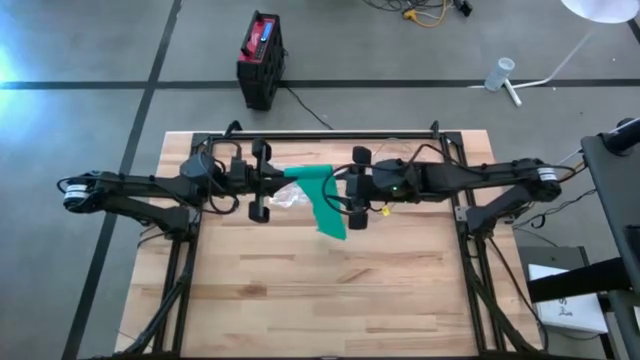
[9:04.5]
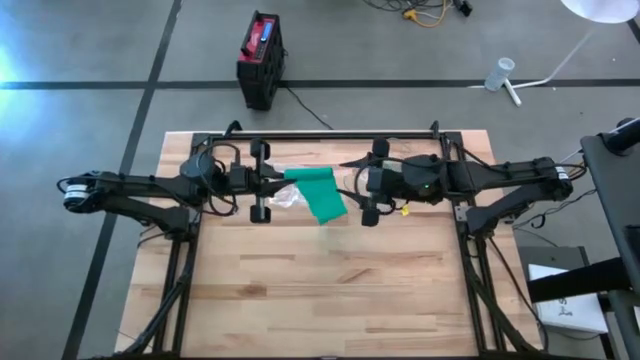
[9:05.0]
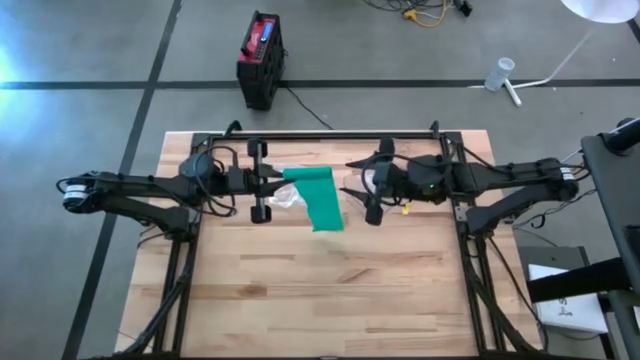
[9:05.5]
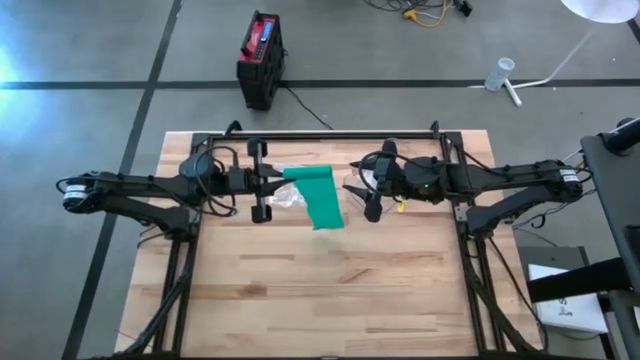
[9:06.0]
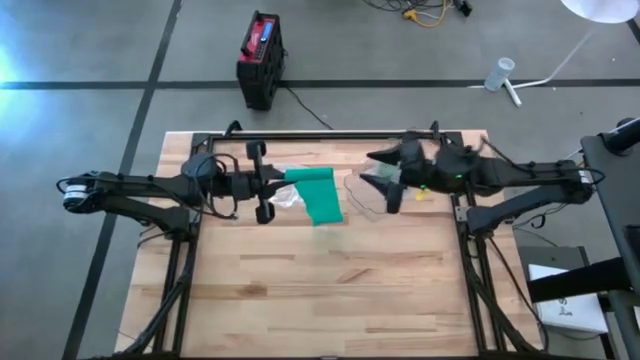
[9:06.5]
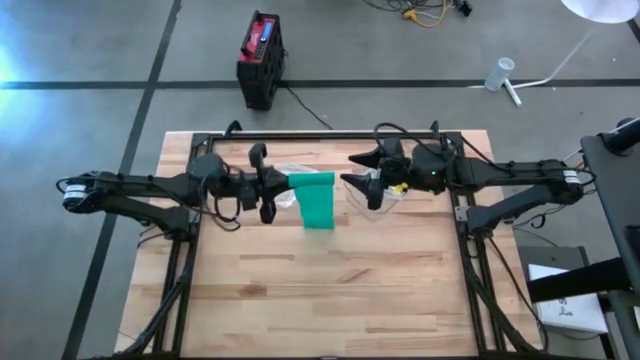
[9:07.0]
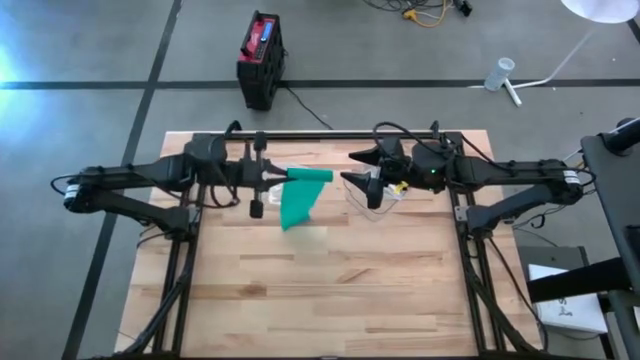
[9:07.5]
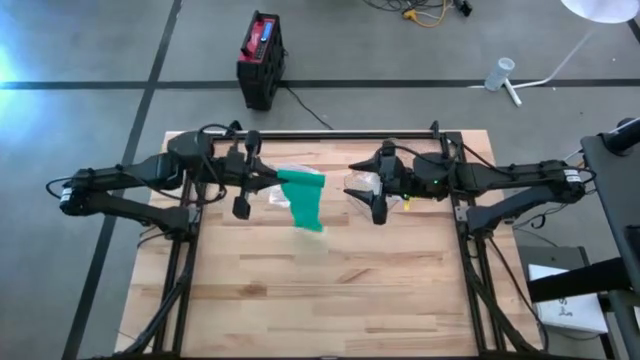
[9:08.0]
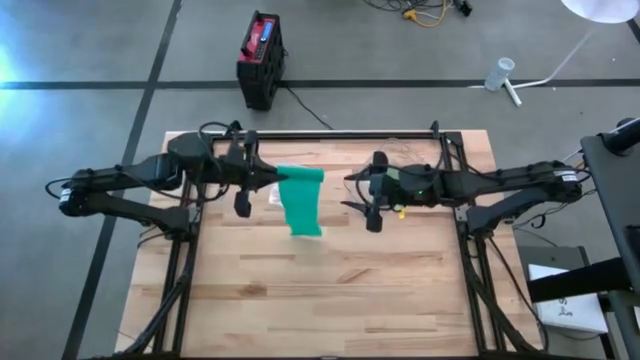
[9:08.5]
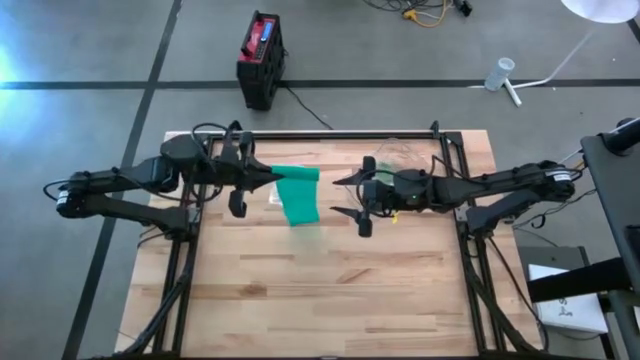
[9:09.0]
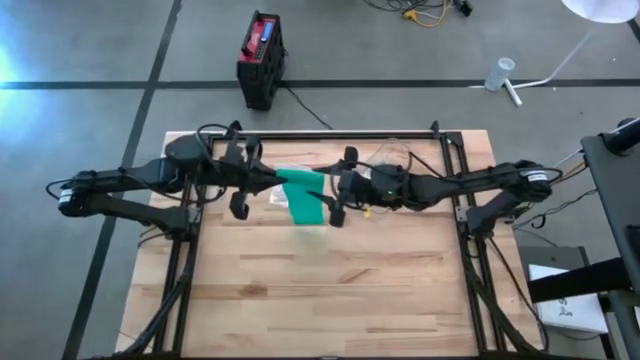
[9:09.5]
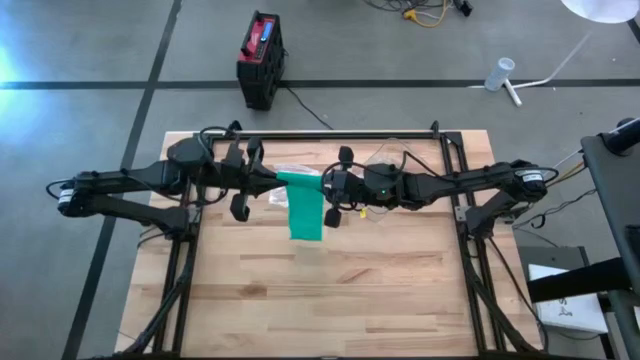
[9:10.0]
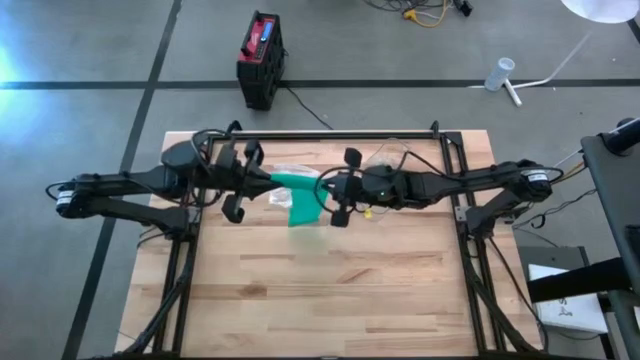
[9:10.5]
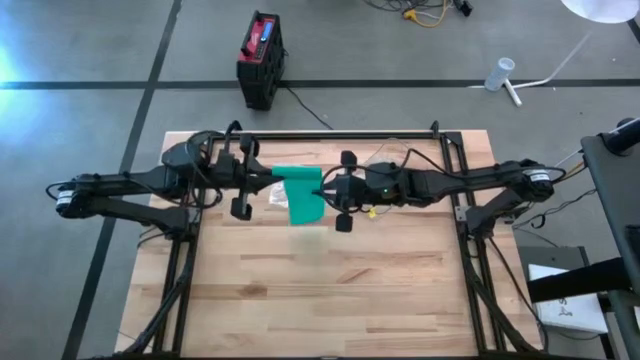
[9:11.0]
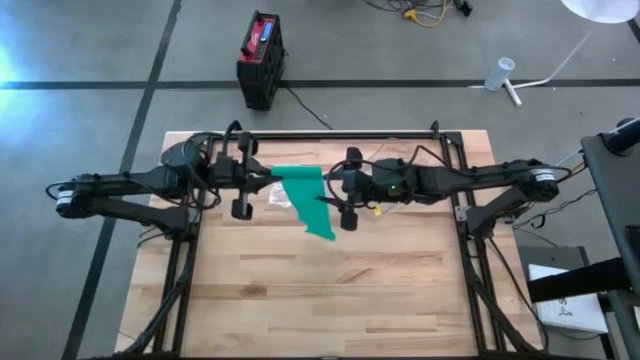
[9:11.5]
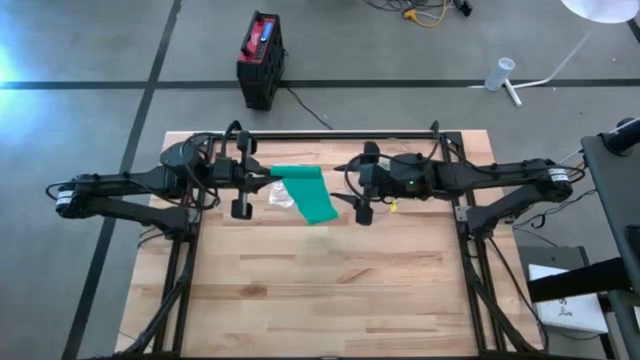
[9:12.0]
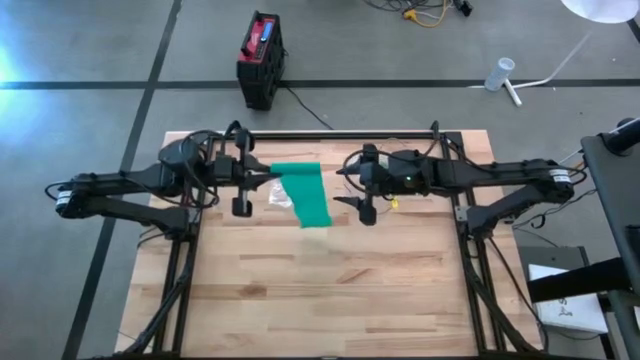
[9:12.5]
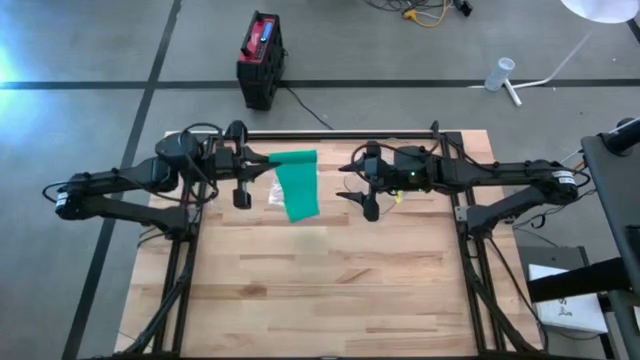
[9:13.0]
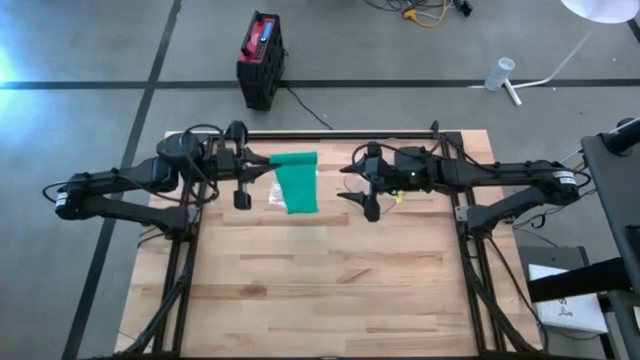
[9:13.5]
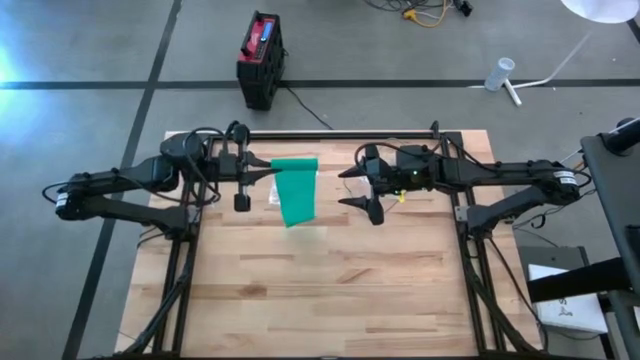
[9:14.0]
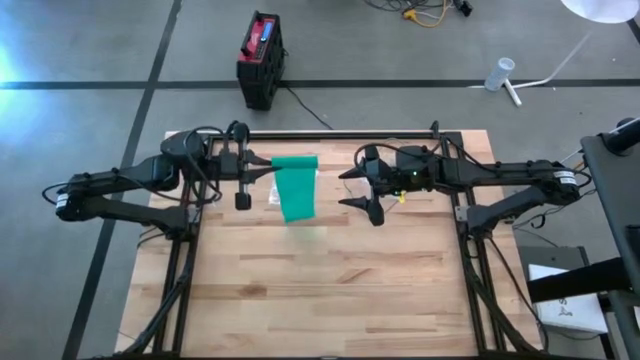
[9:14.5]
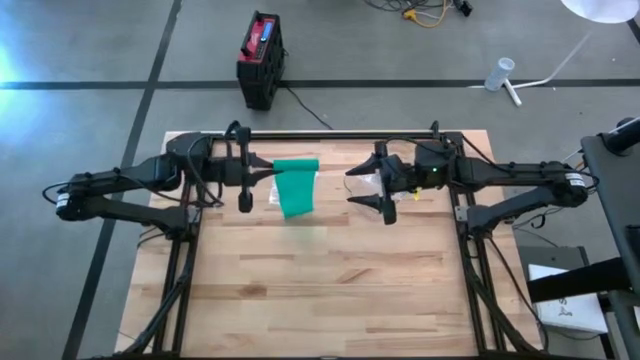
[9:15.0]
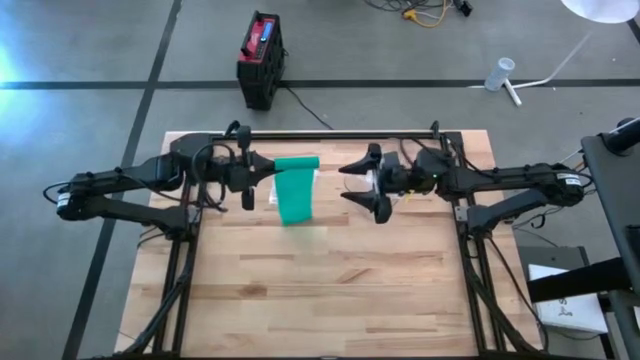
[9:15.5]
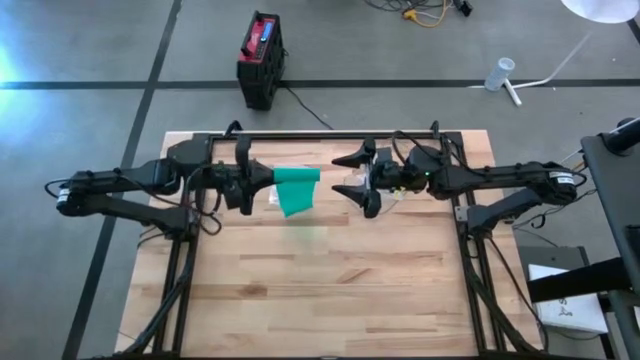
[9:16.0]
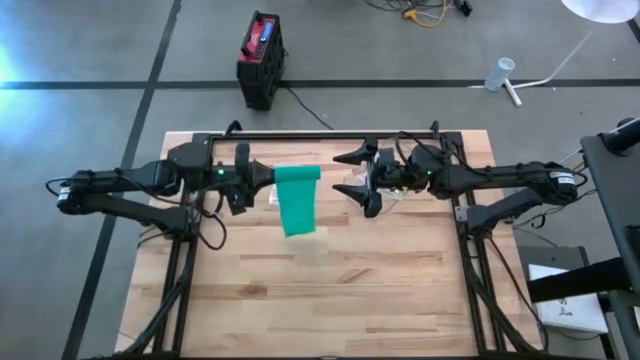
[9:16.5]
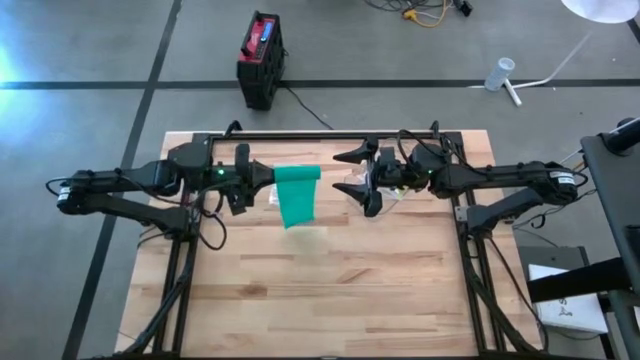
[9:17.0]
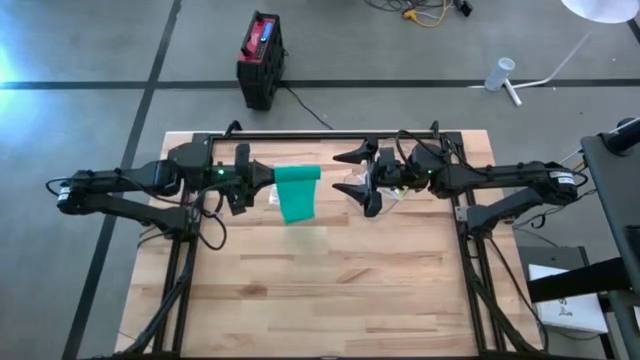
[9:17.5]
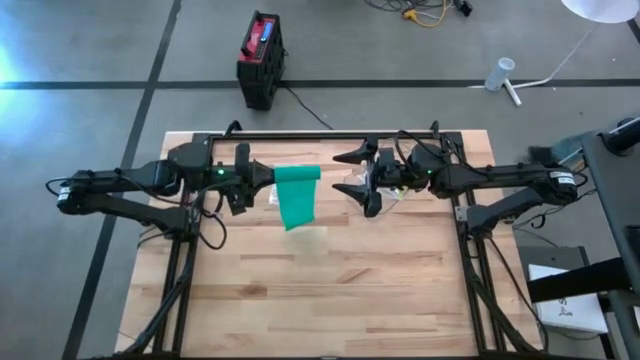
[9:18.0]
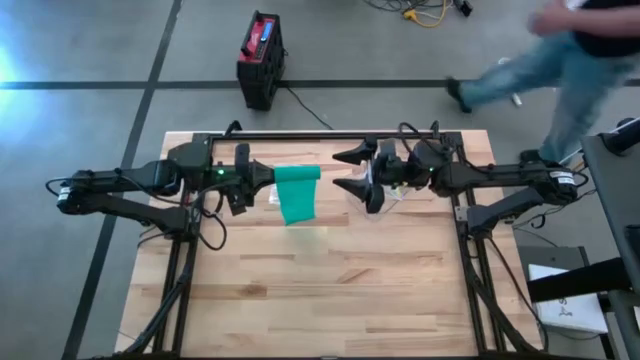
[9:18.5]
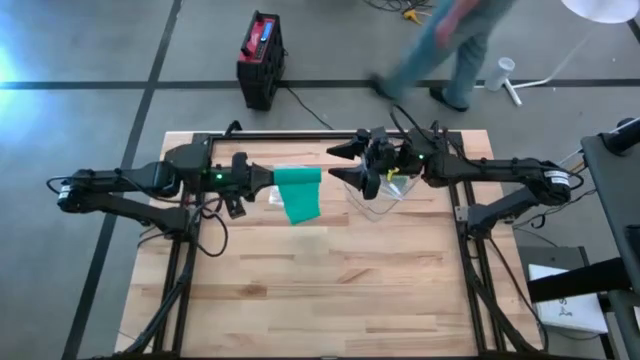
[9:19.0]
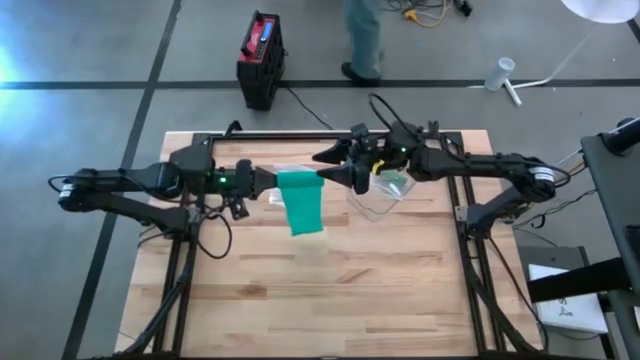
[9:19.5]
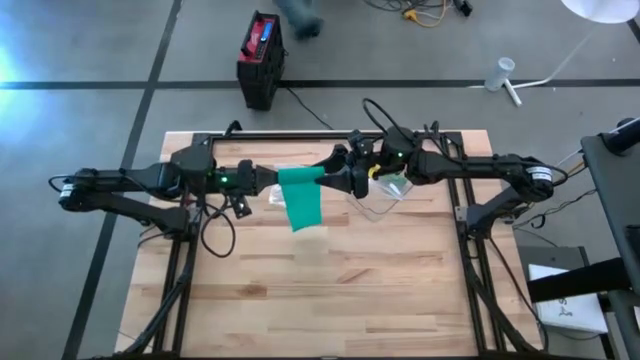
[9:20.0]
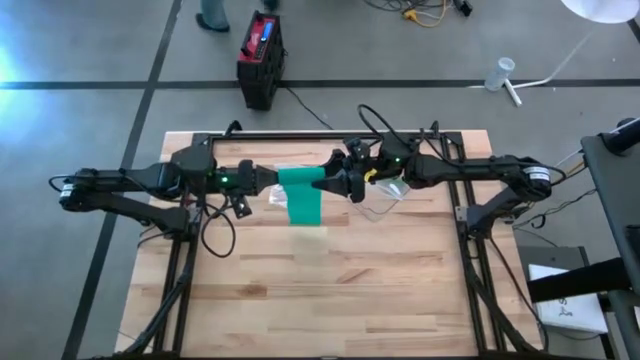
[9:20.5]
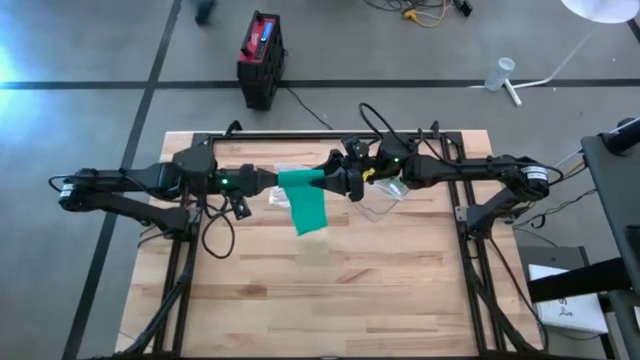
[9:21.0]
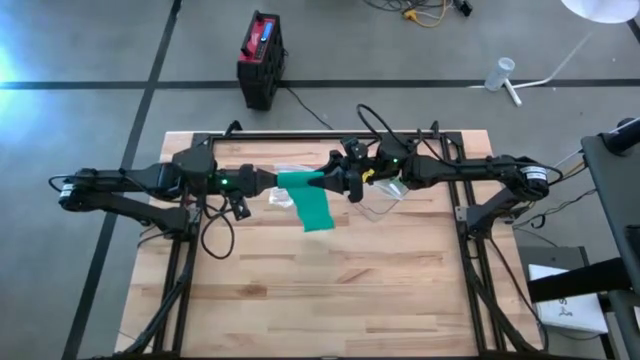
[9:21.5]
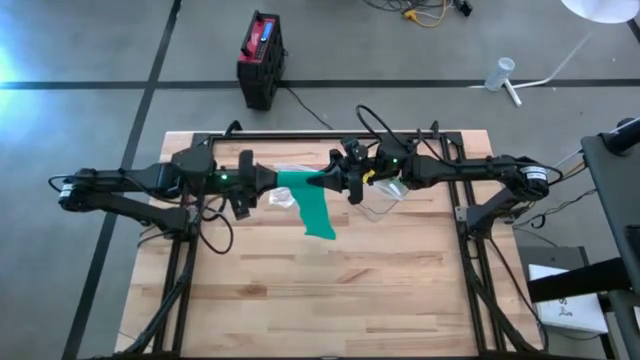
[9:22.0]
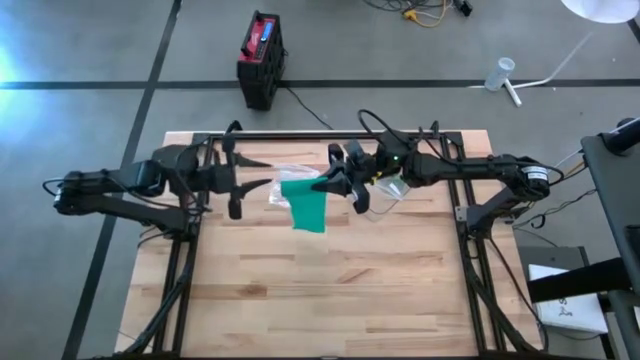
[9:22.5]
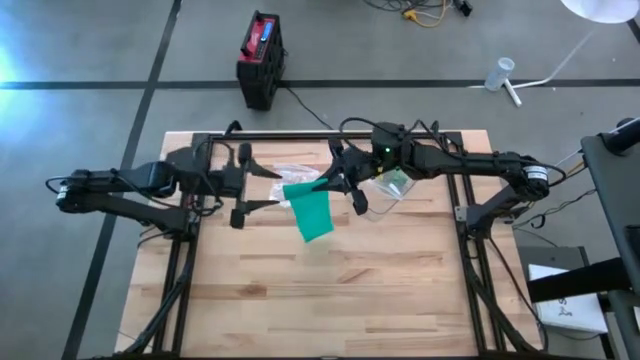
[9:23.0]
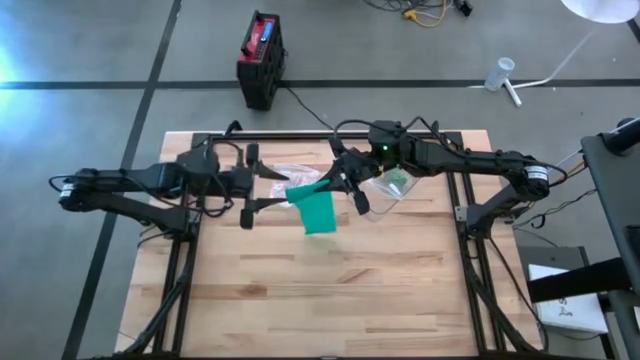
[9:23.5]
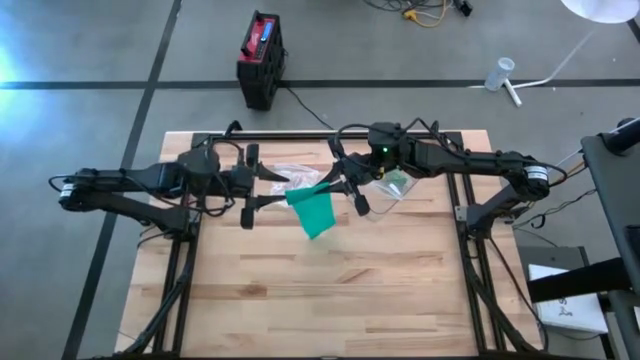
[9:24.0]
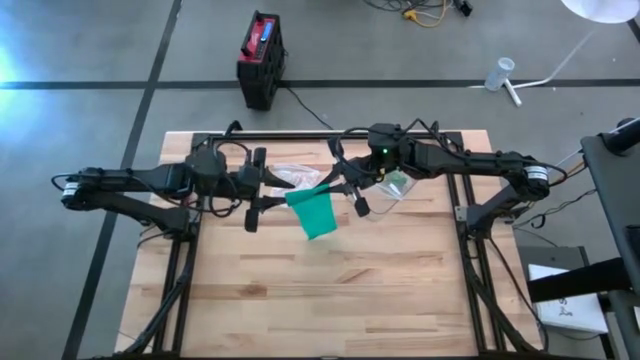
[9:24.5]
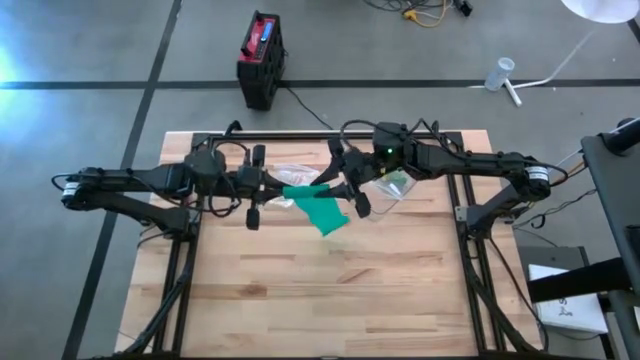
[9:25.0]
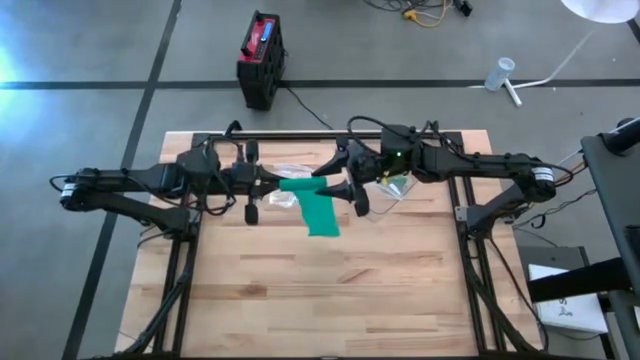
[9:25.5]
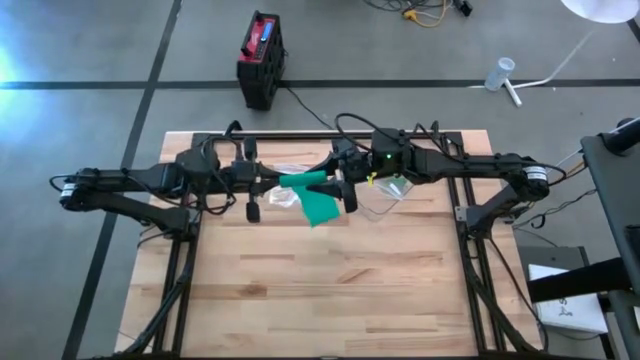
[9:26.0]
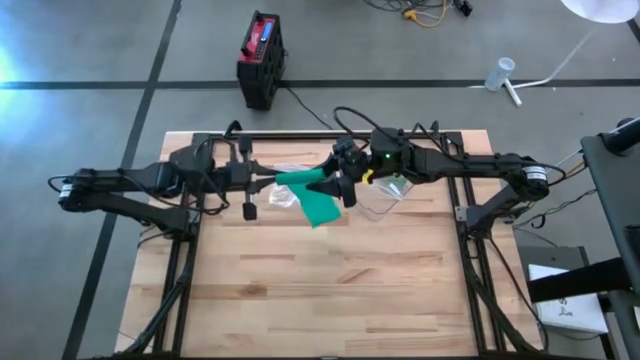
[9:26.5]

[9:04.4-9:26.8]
Task: Roll bandage
Roll the dark green bandage
